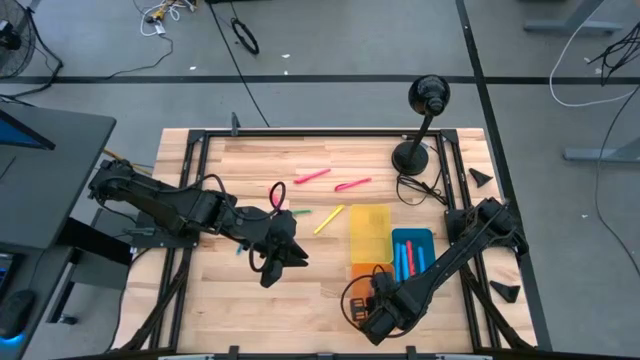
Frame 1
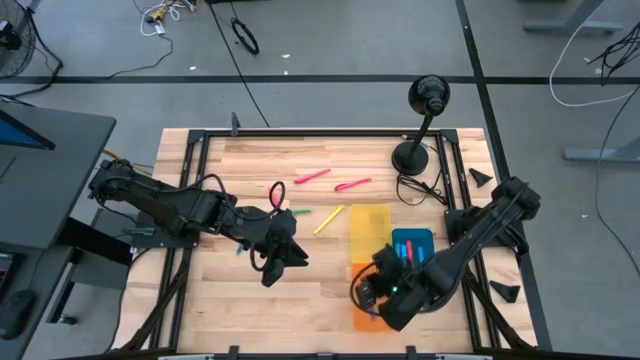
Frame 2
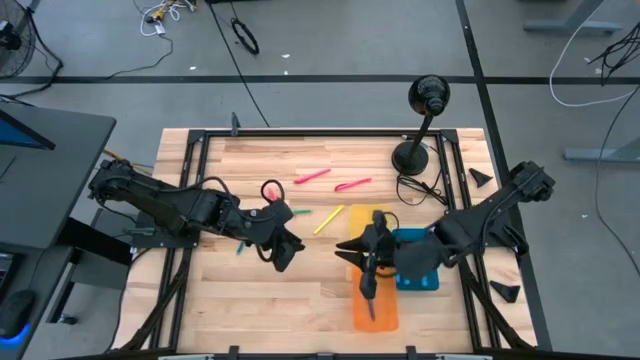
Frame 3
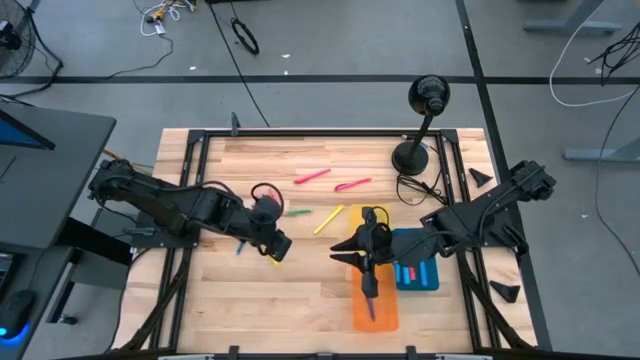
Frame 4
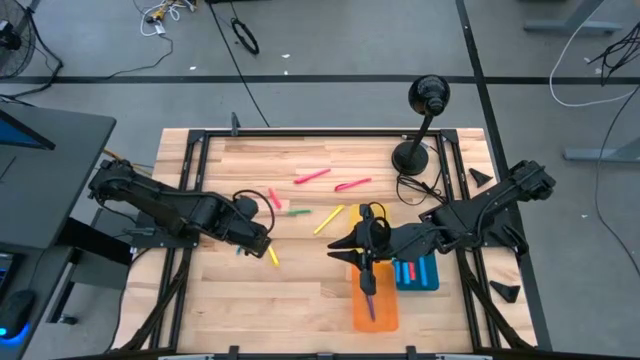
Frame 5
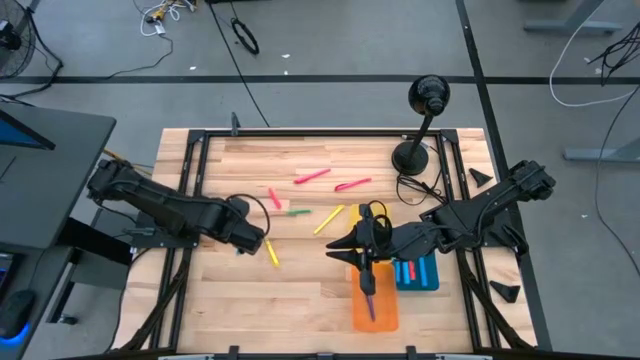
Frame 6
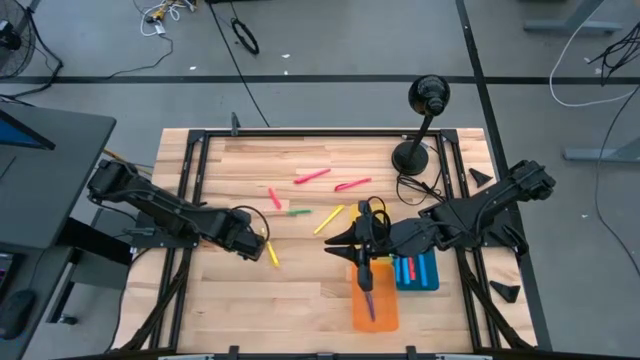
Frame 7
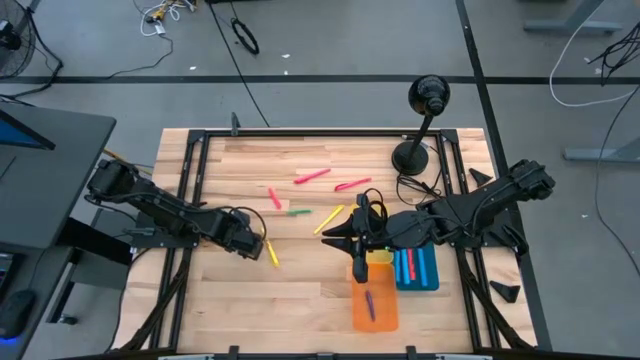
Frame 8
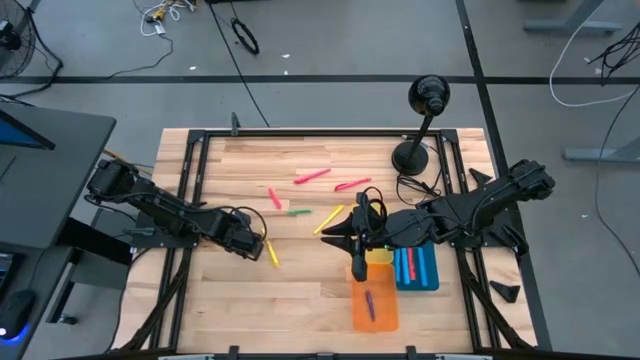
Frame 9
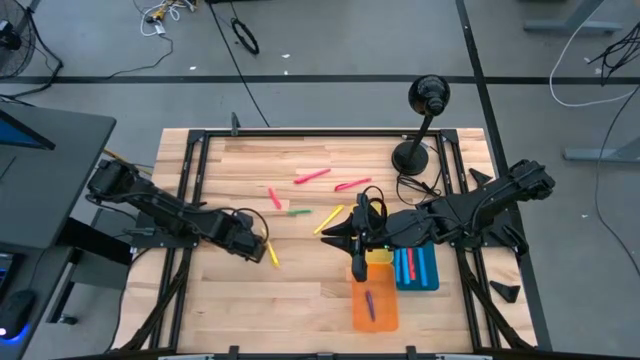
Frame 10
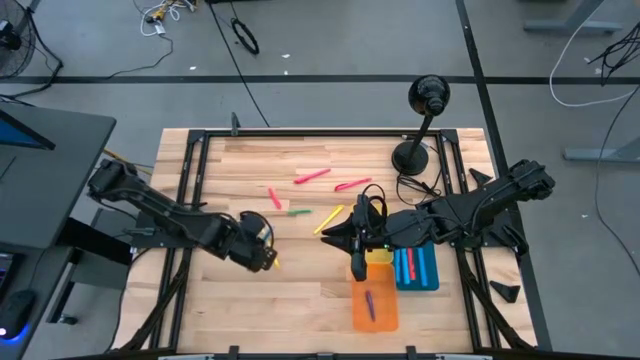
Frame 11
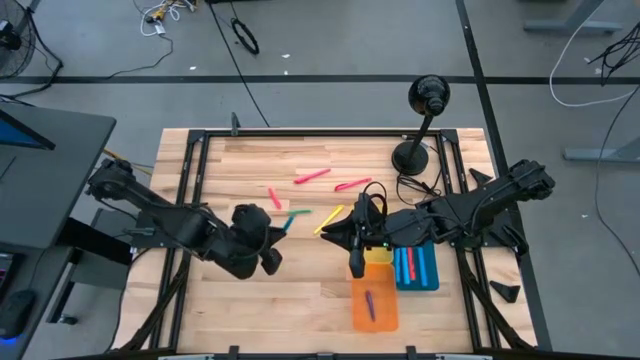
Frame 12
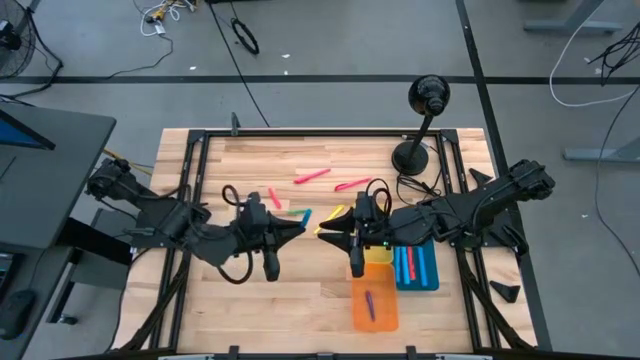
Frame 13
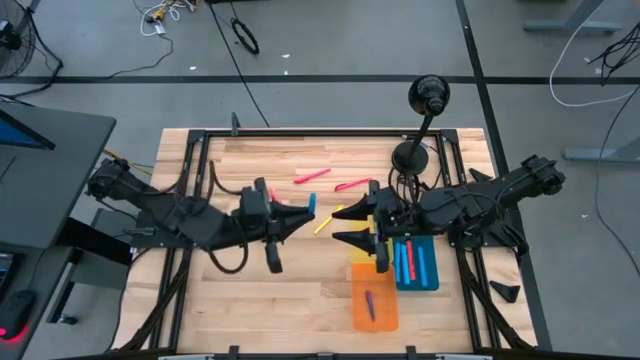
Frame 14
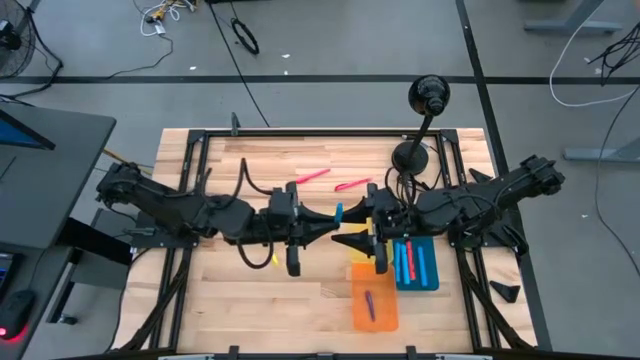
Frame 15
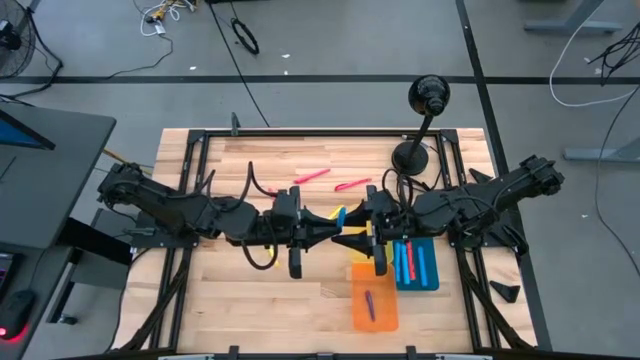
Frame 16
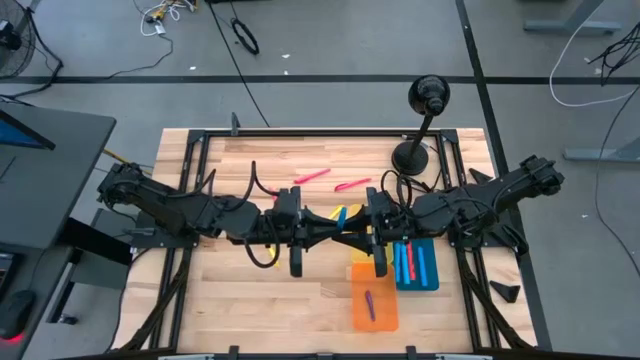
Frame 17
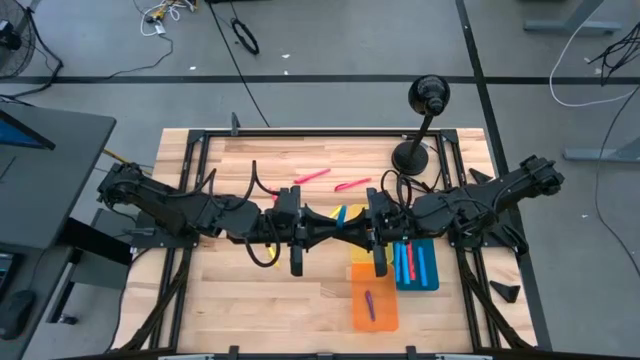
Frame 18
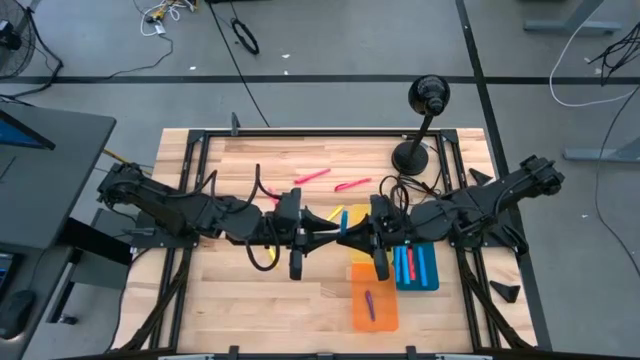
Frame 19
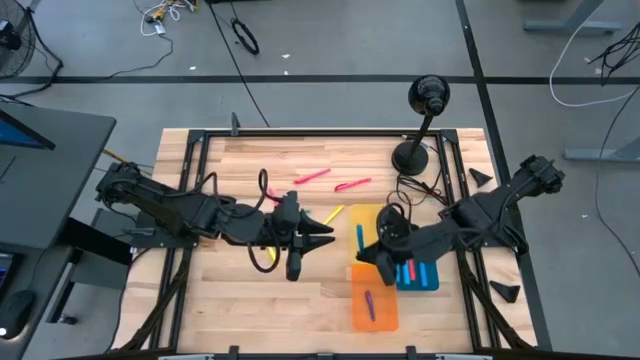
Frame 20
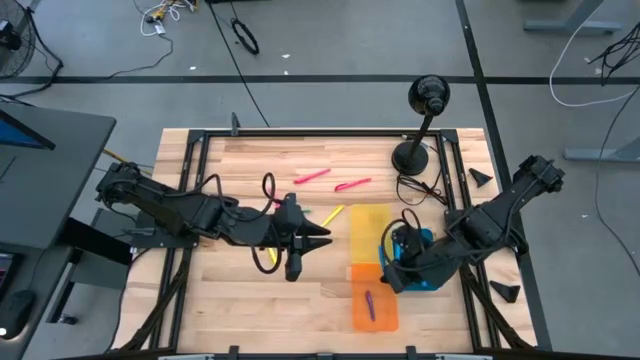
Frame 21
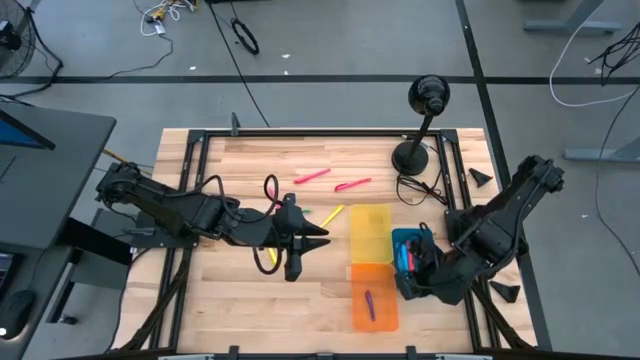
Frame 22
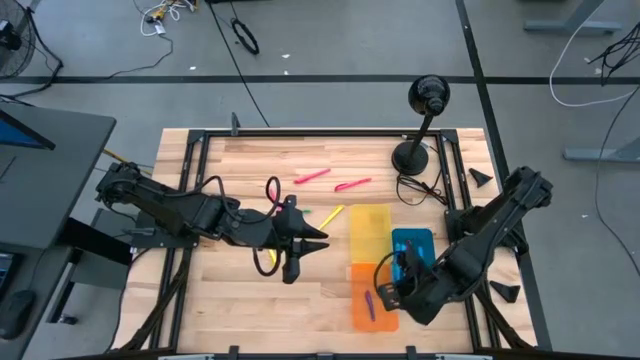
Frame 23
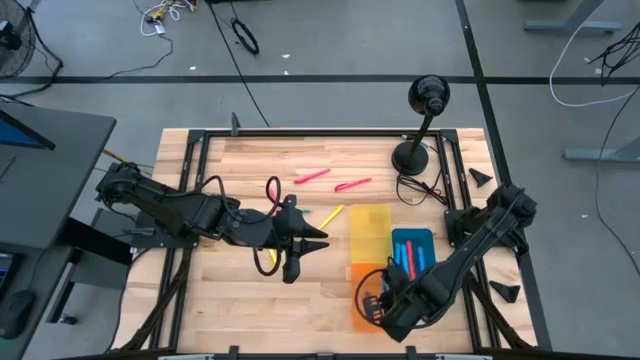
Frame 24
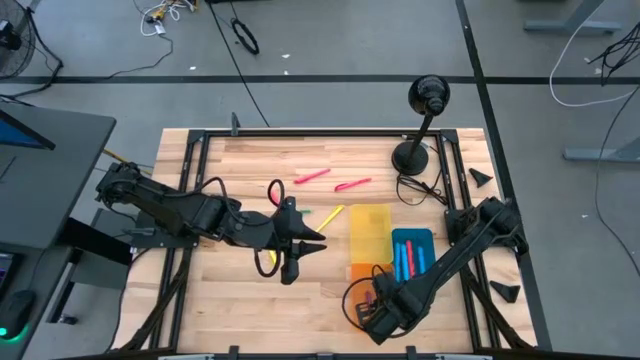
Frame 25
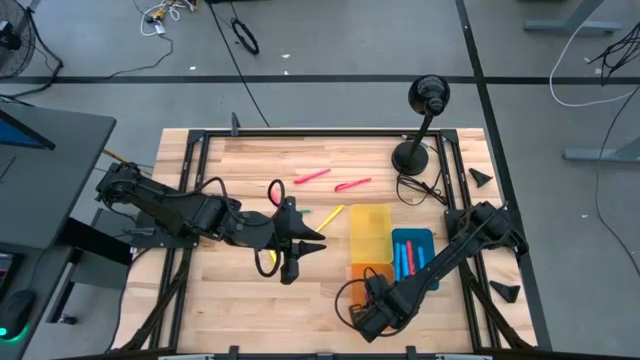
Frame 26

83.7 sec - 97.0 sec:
Task: Pick & Place Markers
Put the blue pen into the orange bin

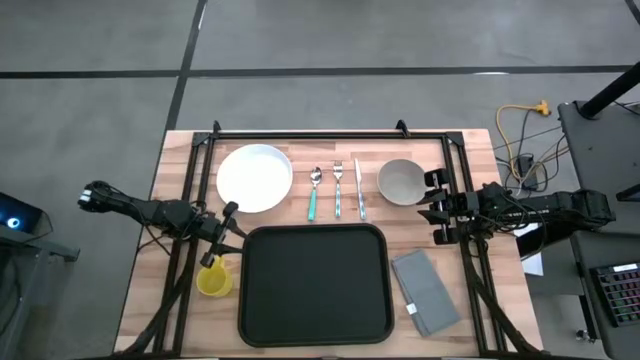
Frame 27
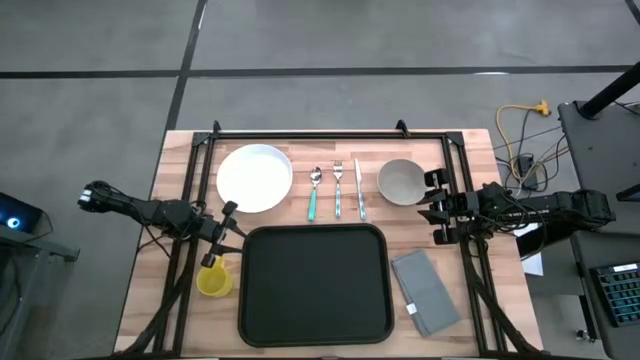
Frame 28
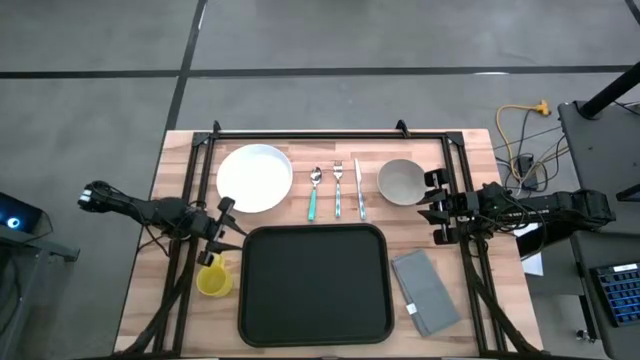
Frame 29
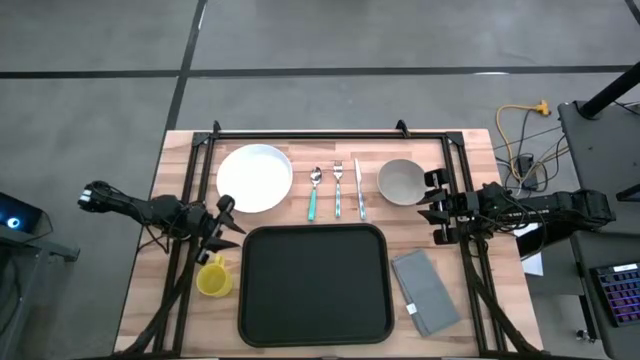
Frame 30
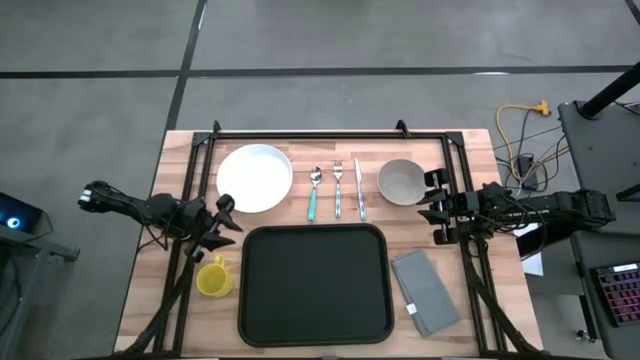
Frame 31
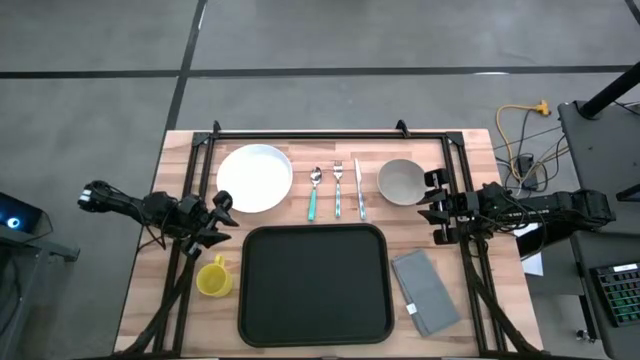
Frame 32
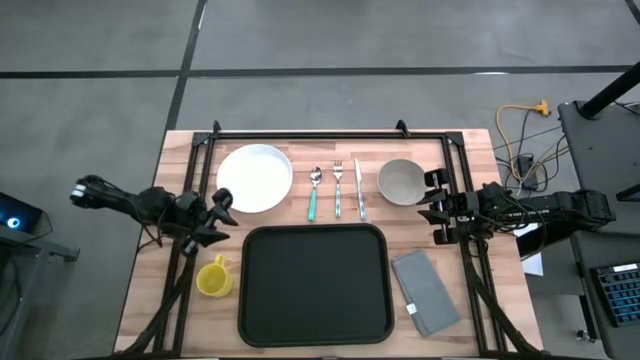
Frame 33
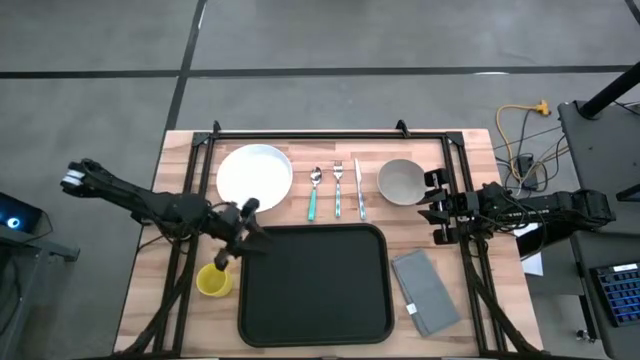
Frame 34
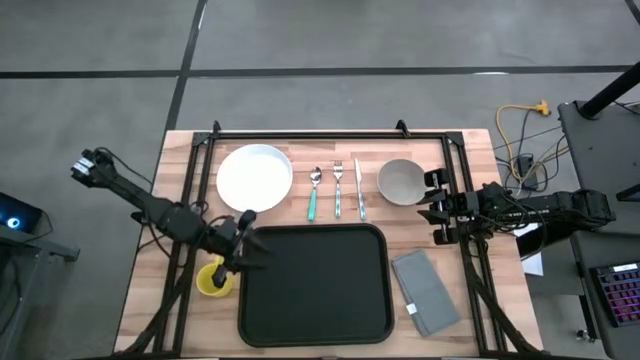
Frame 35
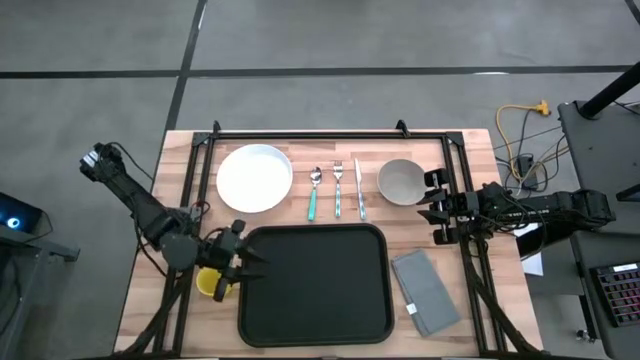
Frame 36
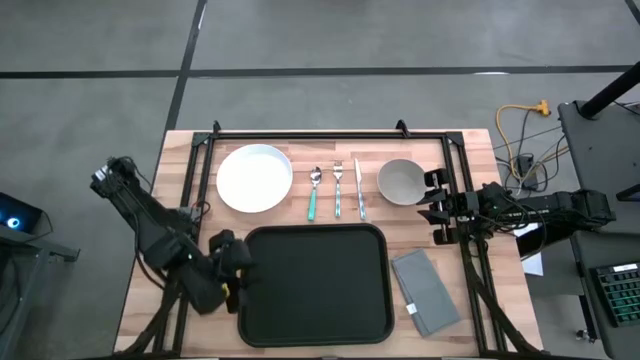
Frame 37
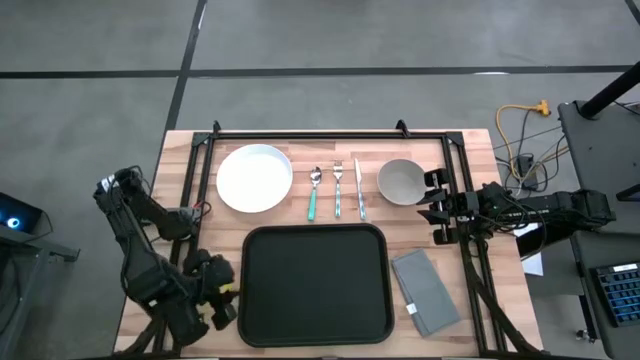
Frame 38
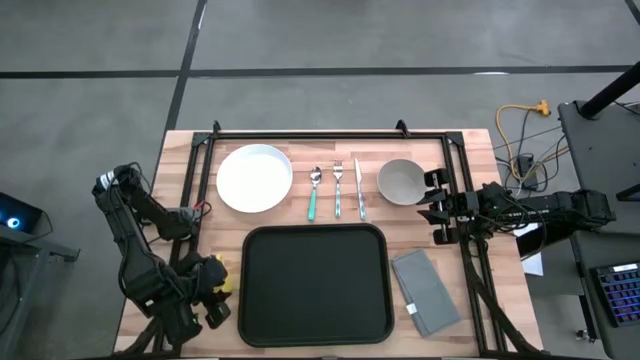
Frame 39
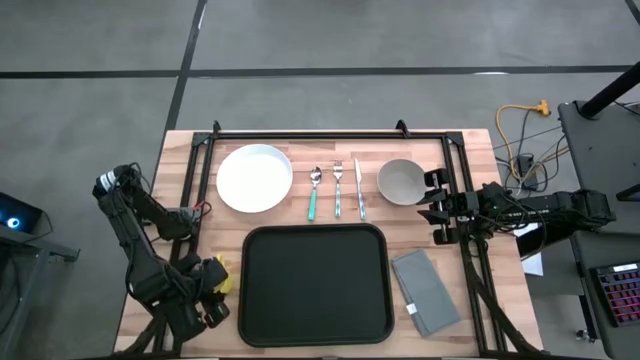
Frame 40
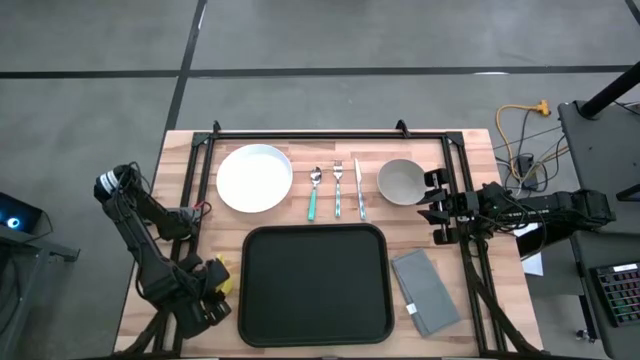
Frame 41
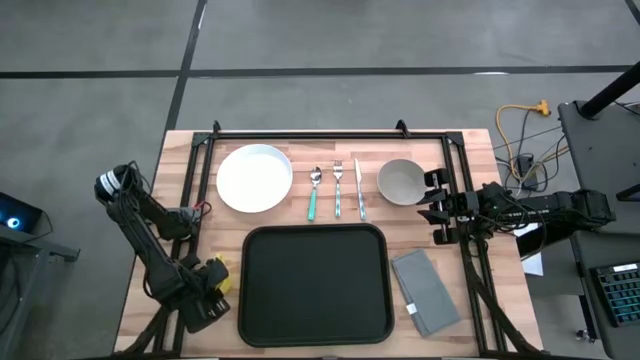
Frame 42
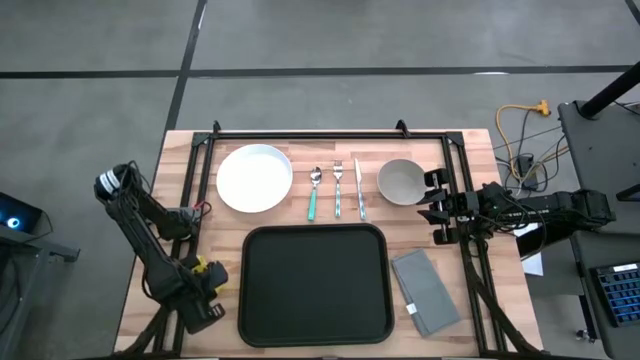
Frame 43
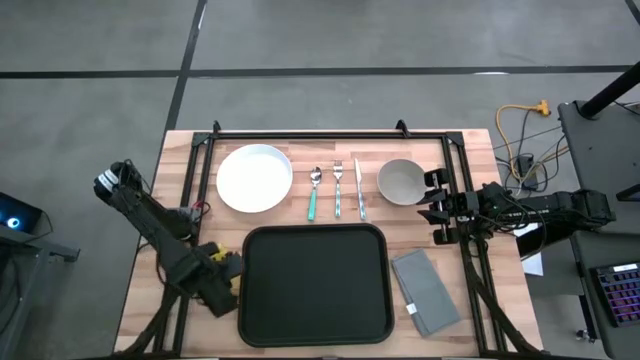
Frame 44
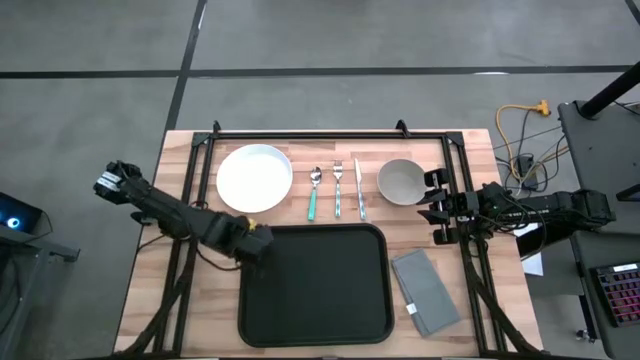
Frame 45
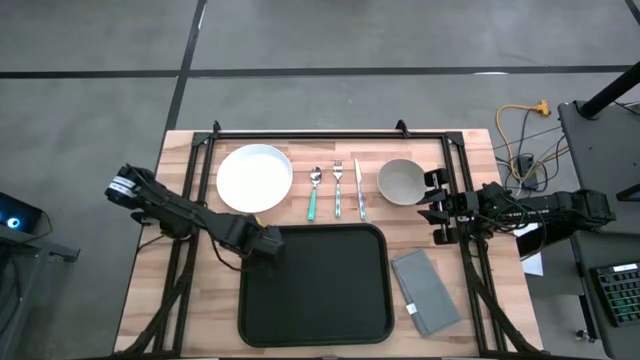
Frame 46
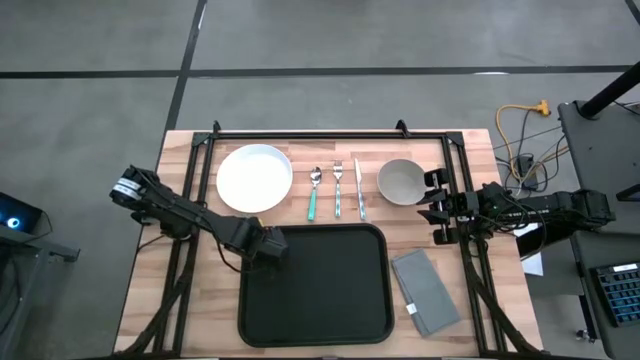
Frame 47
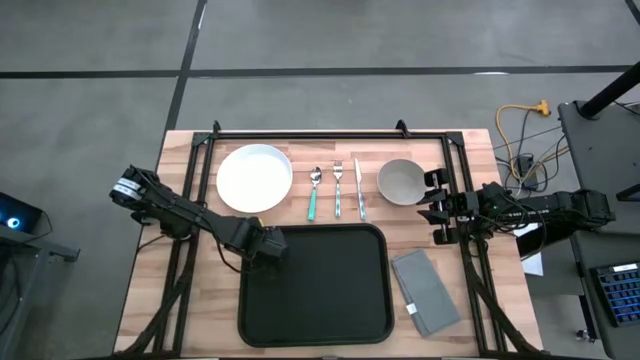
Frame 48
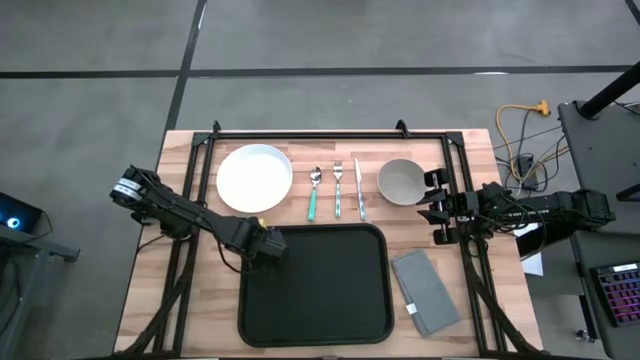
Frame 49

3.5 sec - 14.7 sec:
Task: Set up tray
Put the yellow cup on the top left of the black serving tray
